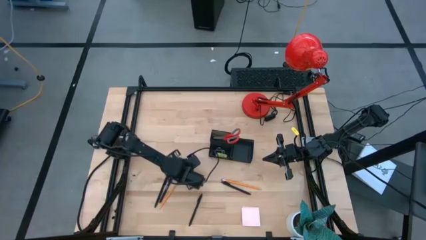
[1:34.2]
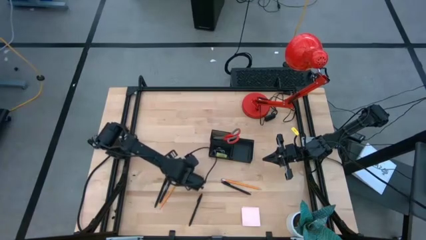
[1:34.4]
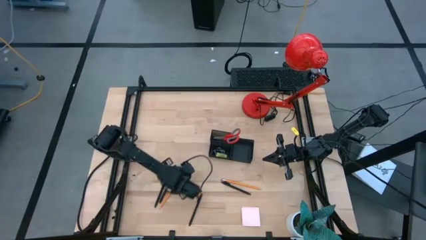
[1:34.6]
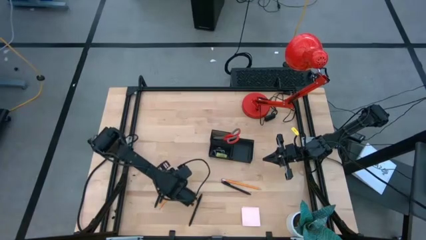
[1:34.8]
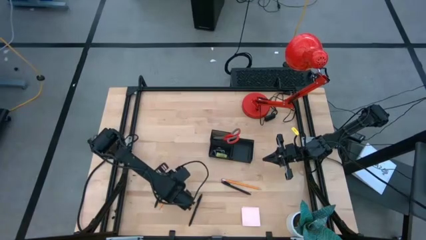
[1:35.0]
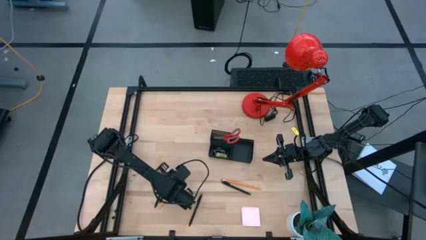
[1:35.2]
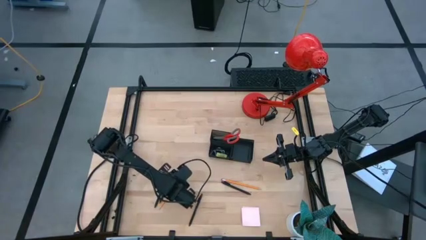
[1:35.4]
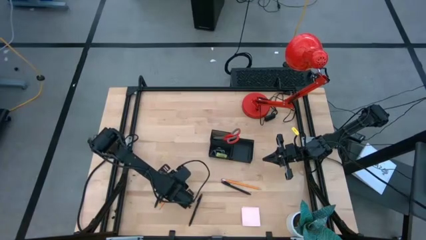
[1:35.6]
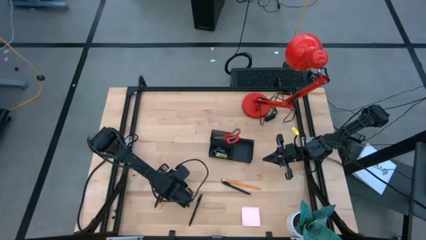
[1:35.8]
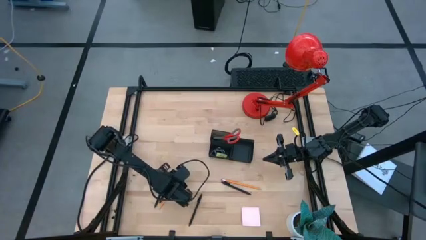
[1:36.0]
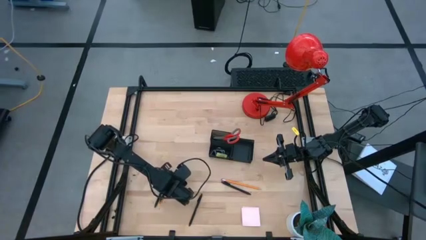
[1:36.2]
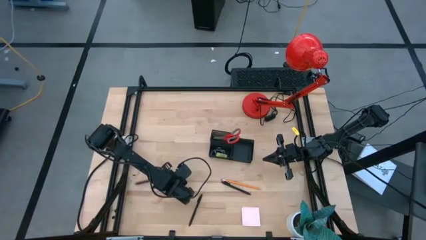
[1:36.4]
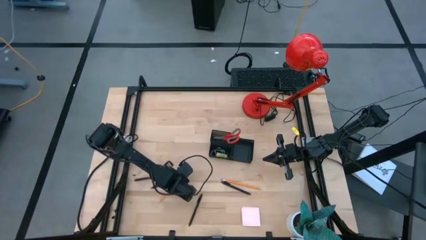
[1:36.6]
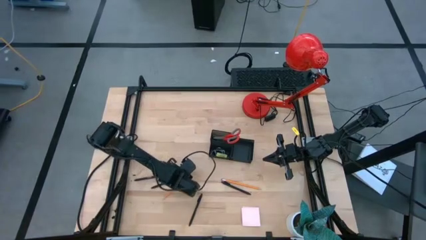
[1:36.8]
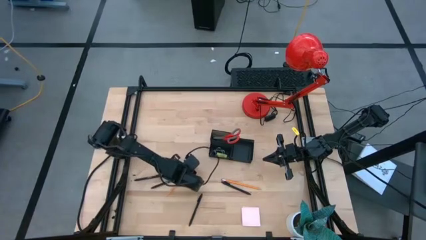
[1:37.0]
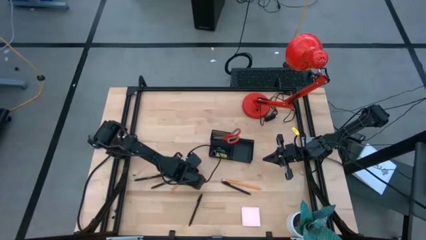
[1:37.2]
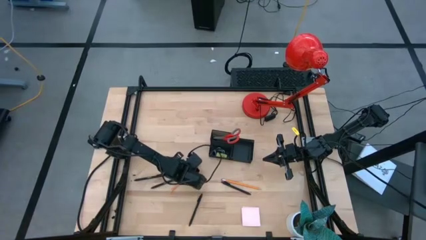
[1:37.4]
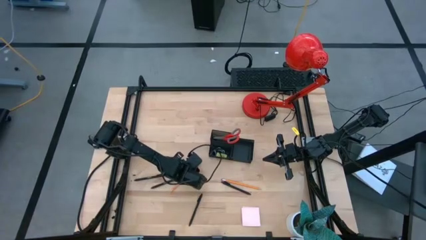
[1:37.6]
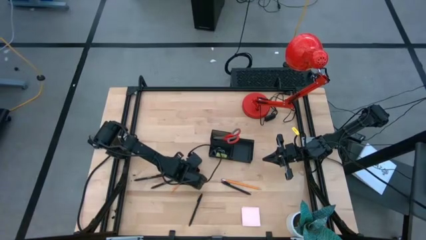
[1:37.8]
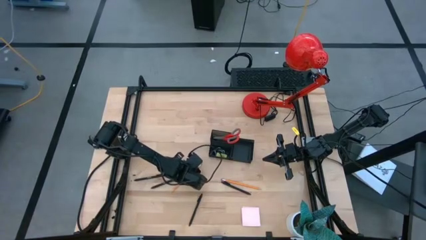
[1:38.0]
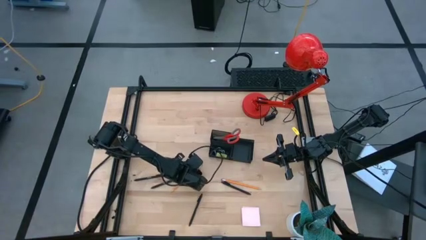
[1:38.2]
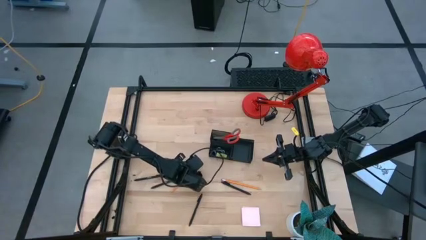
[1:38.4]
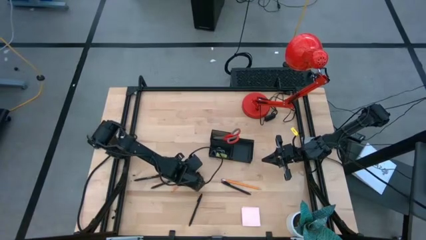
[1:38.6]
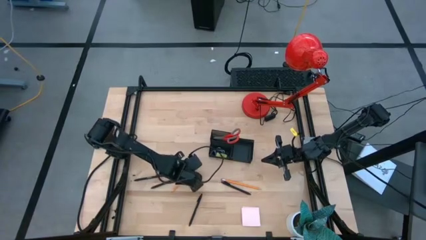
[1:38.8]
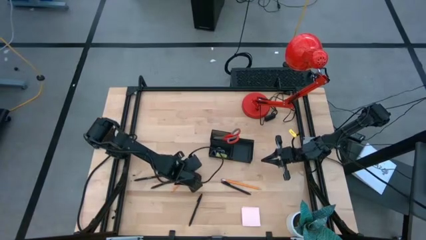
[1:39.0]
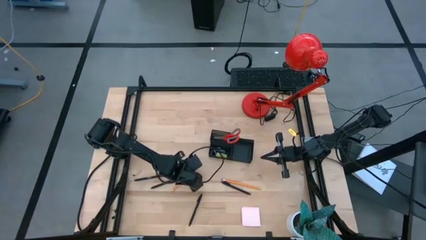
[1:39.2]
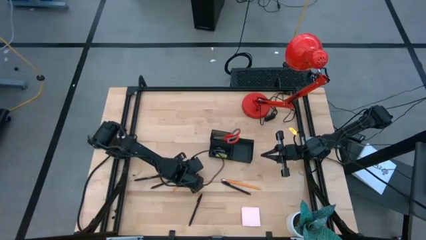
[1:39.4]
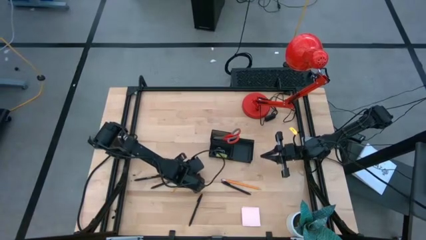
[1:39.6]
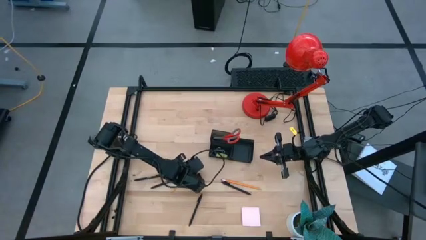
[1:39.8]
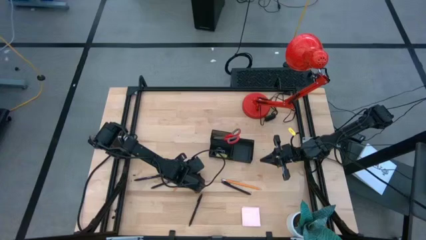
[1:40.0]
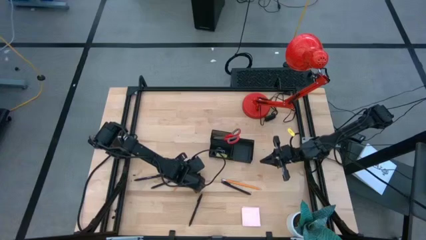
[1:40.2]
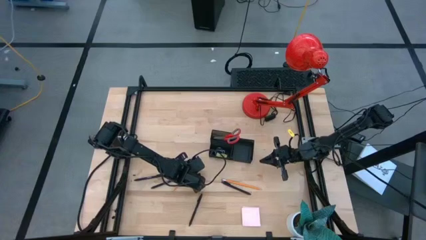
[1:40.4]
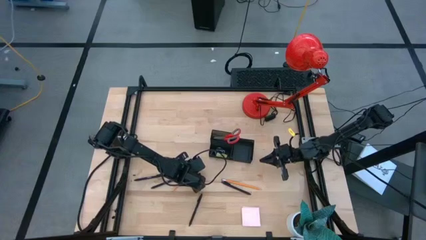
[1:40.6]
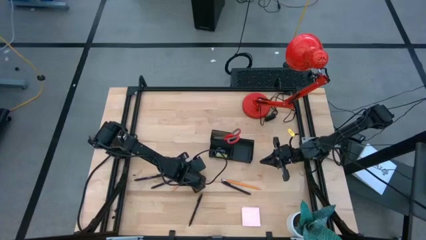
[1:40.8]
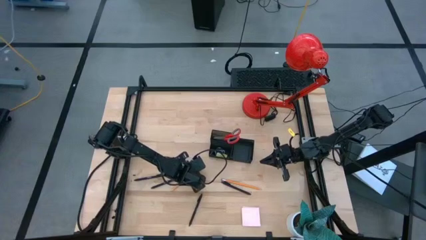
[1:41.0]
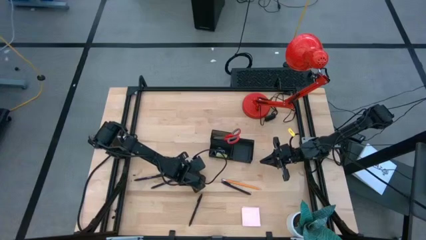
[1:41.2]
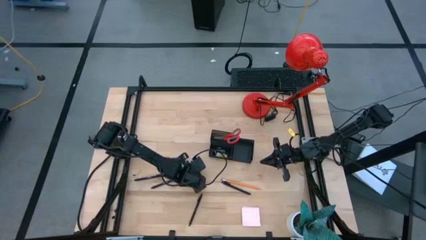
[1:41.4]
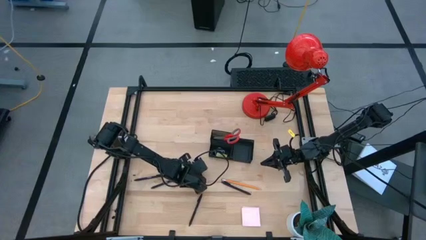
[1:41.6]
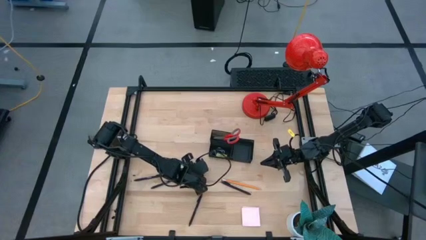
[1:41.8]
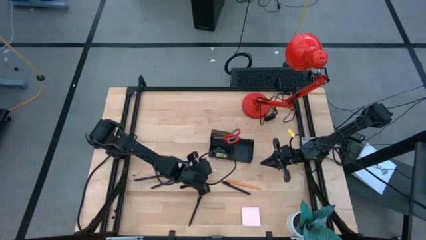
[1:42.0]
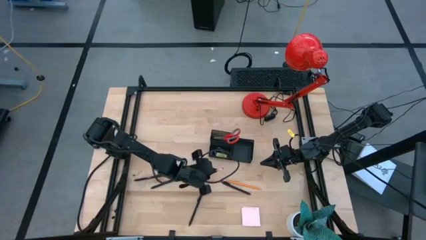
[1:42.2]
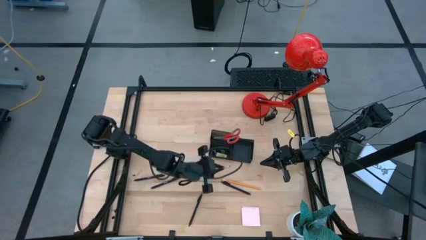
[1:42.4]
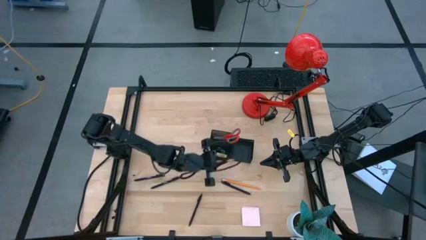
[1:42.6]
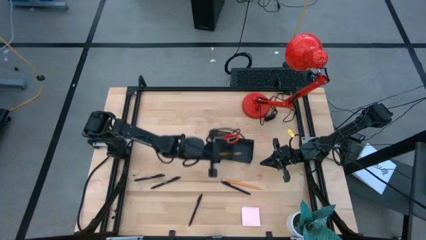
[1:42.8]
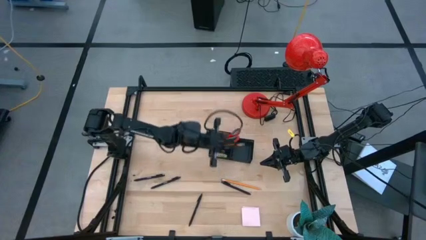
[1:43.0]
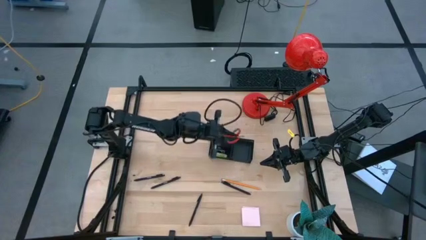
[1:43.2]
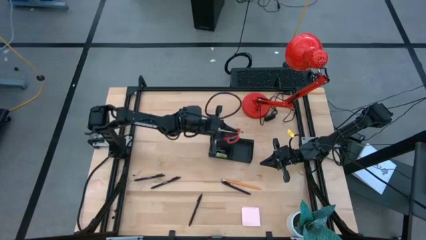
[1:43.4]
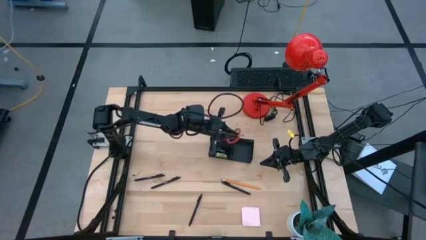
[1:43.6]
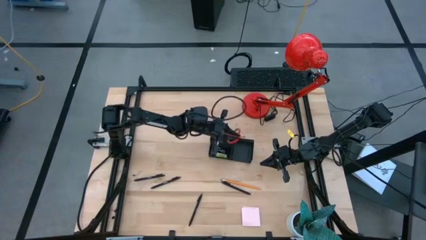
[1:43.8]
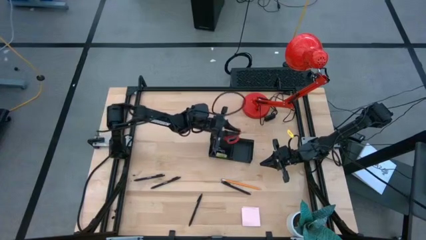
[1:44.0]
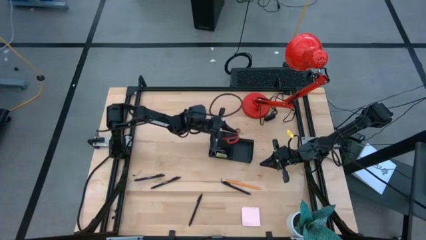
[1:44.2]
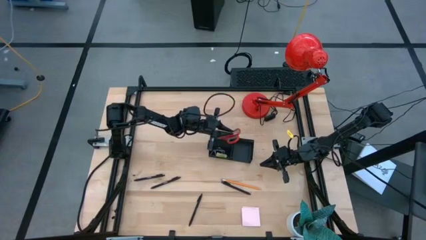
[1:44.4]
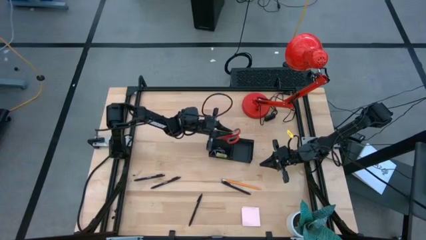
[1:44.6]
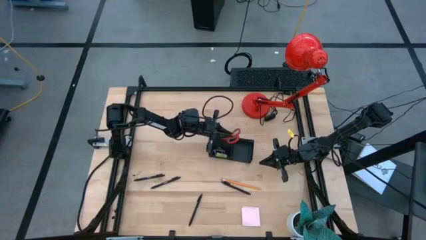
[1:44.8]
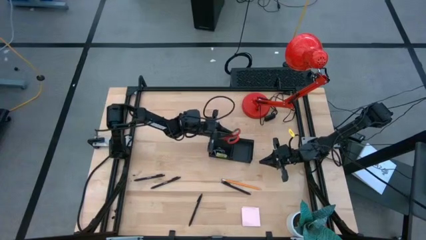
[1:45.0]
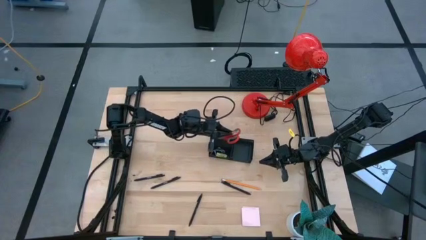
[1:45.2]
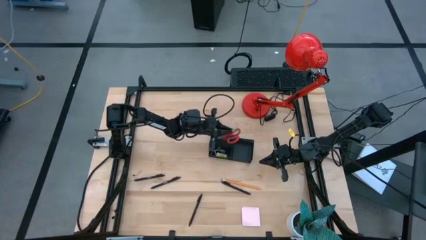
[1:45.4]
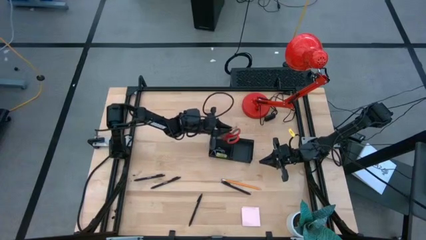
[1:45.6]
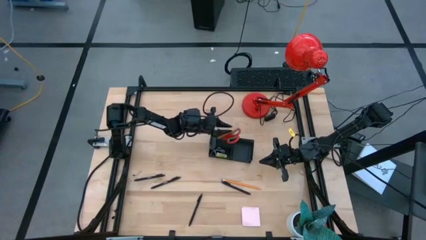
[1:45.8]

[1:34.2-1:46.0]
Task: Pick and place office supplies into organizer
Put the yellow pencil into the black desk organizer
